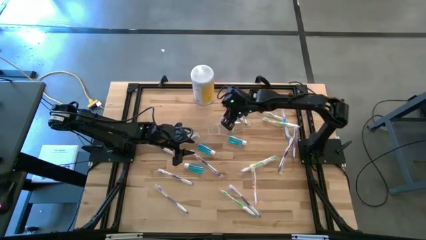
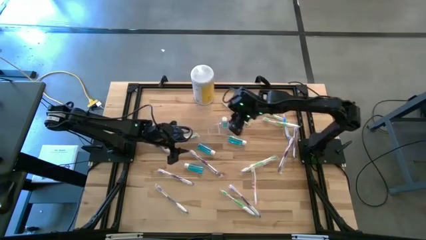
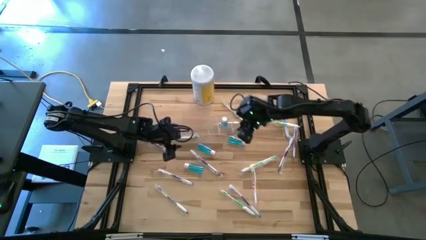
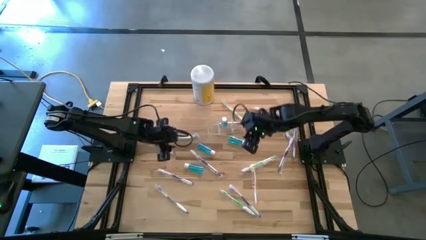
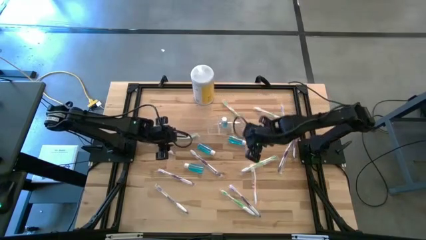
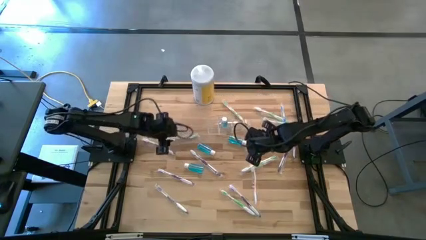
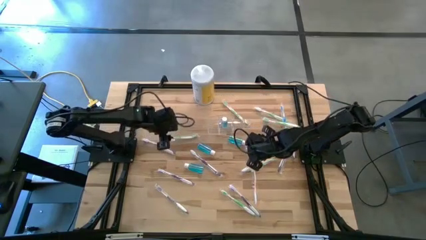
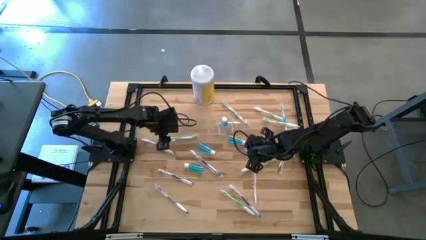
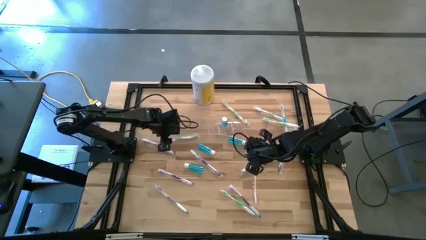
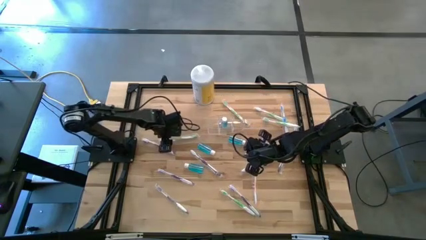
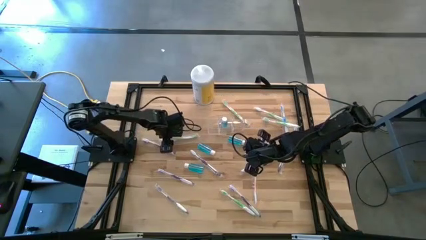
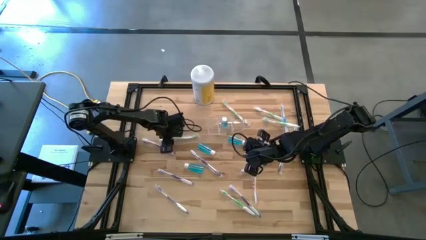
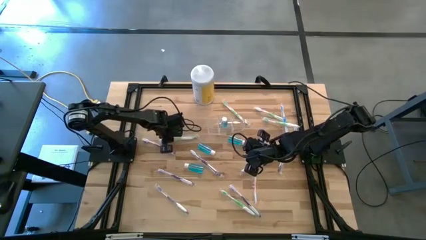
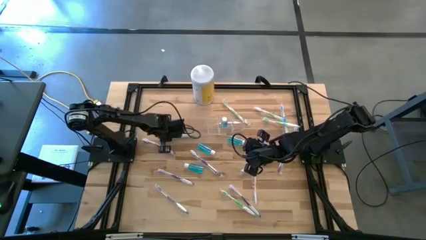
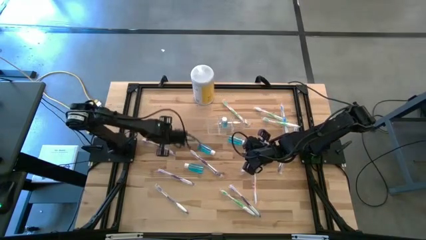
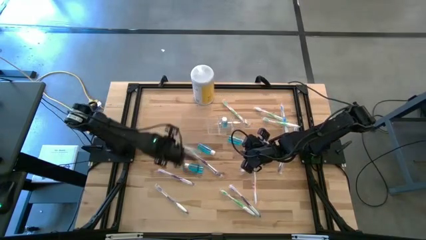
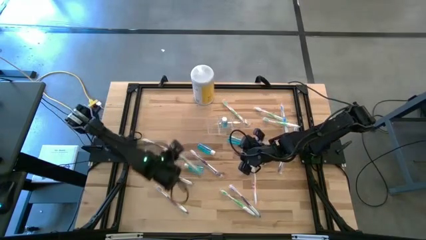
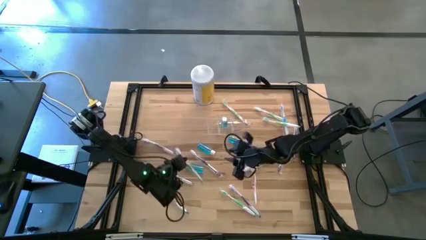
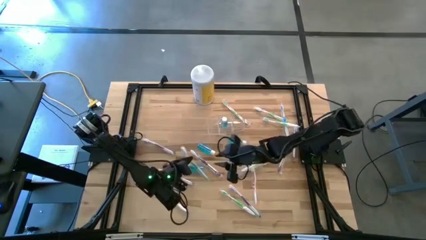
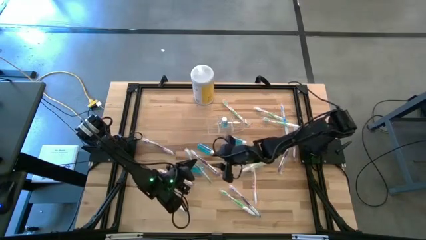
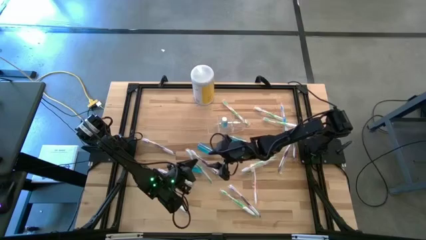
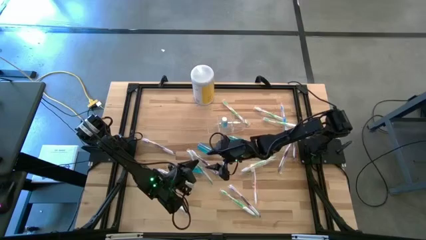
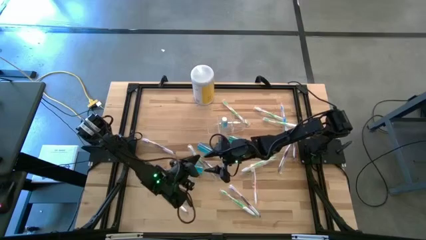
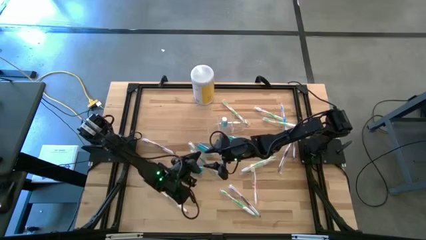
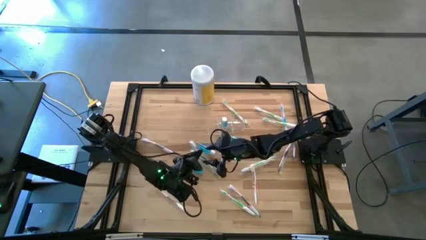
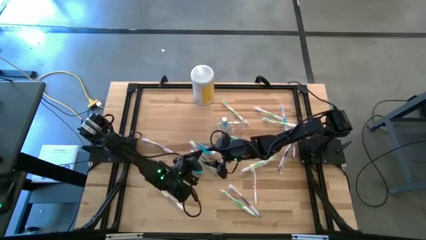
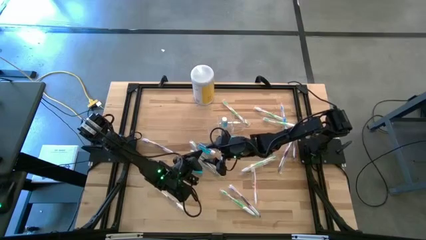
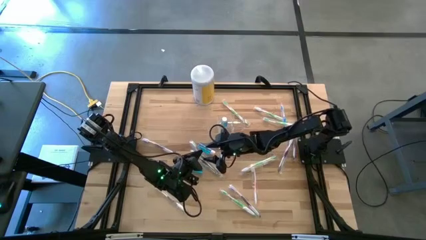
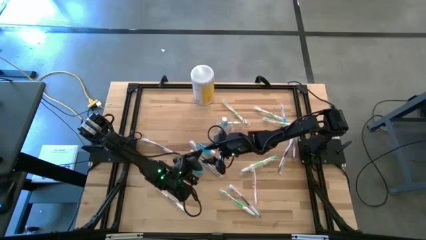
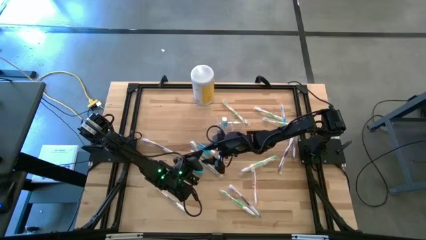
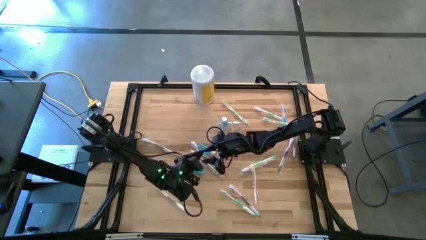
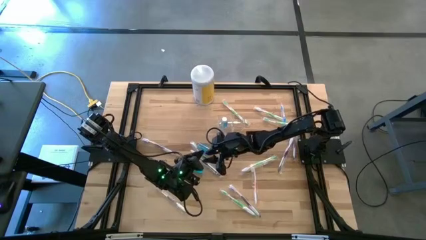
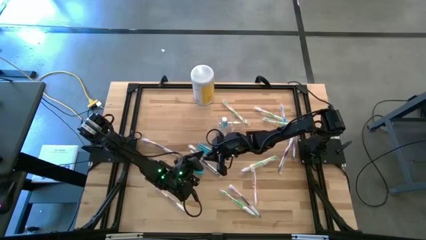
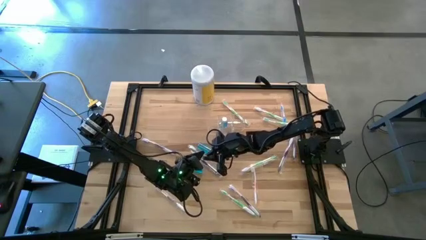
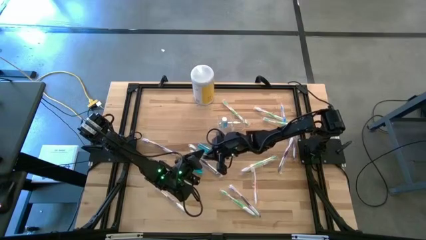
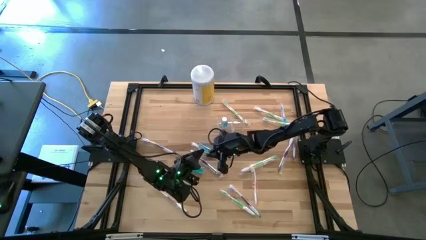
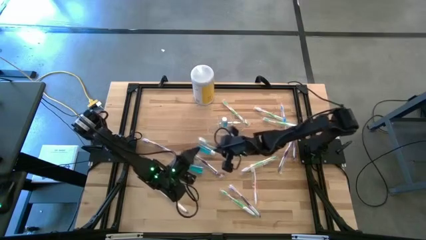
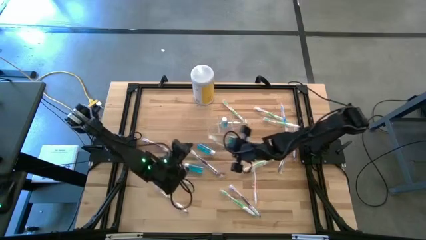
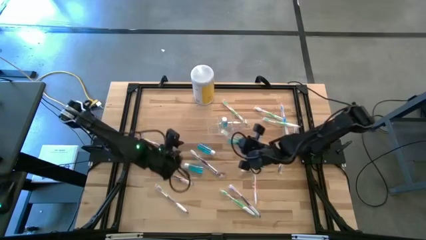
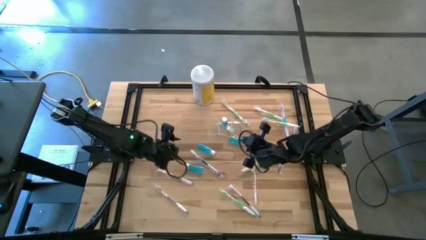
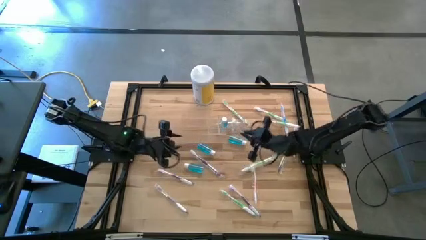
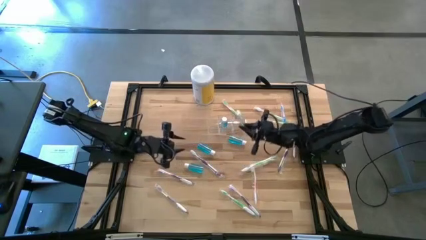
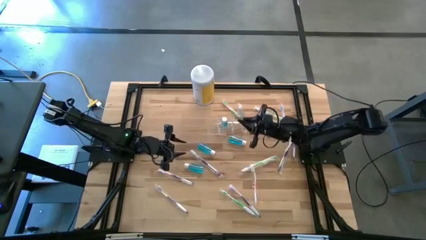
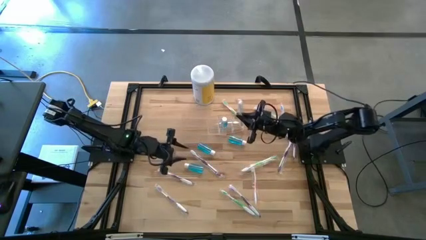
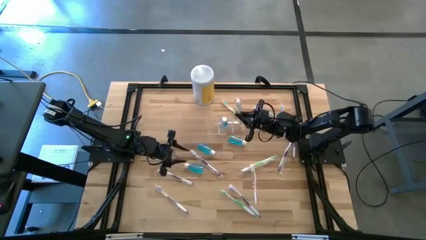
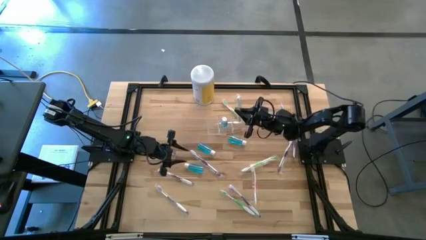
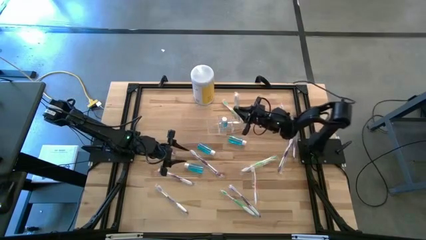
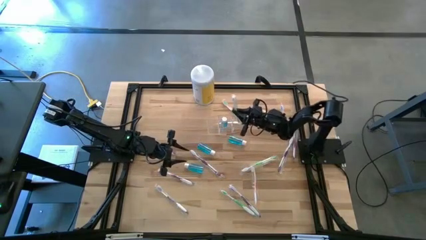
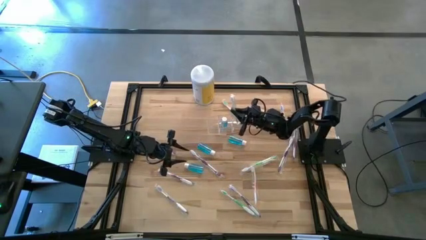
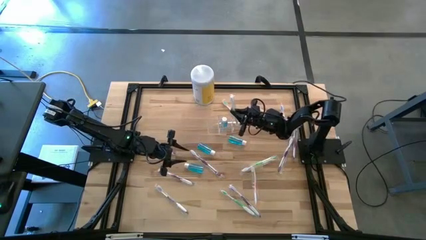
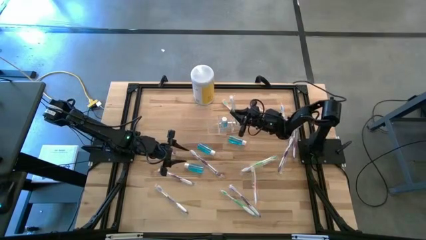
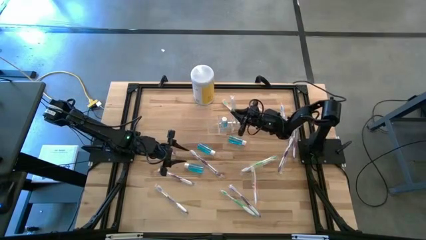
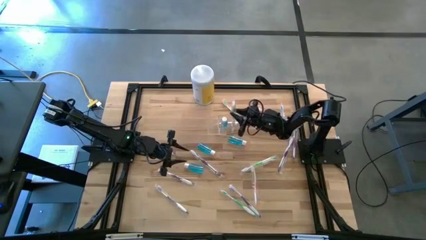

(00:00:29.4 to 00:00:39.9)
Task: Pick & Place toothbrushing station
Put the green toothbrush into the transparent organizer
